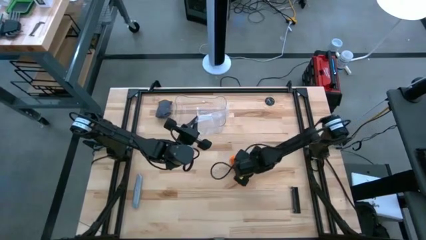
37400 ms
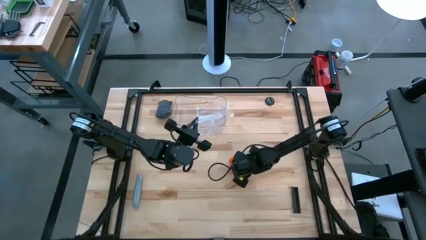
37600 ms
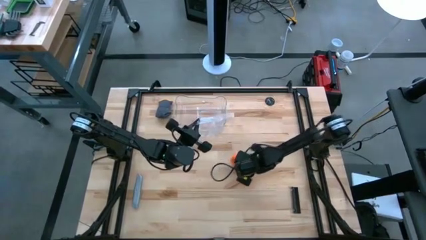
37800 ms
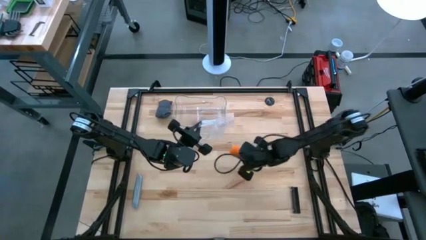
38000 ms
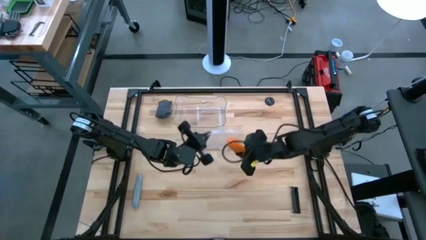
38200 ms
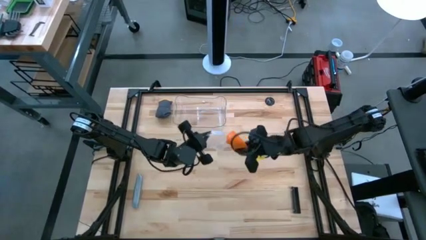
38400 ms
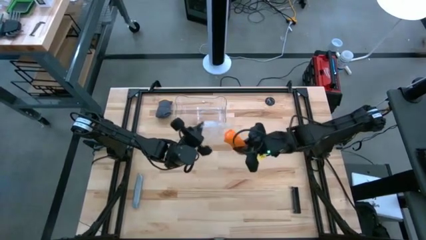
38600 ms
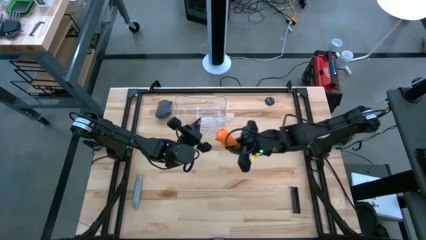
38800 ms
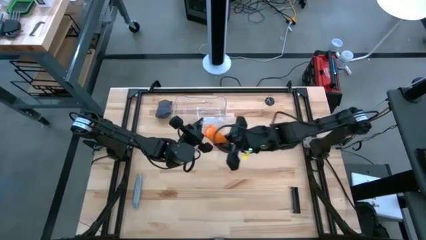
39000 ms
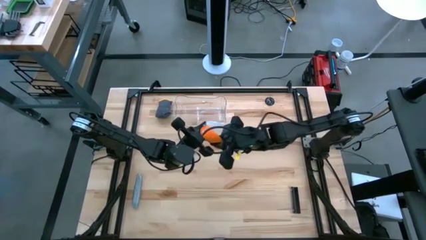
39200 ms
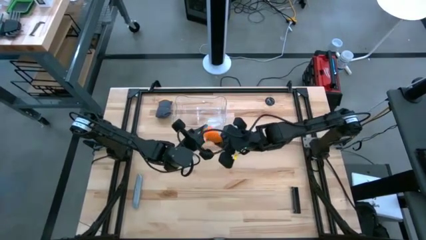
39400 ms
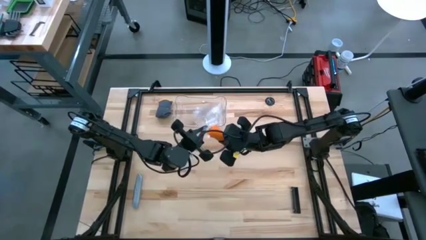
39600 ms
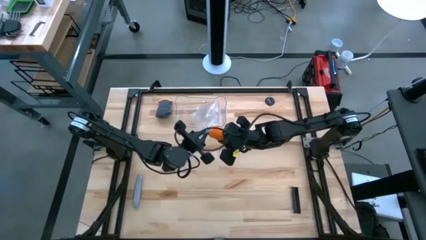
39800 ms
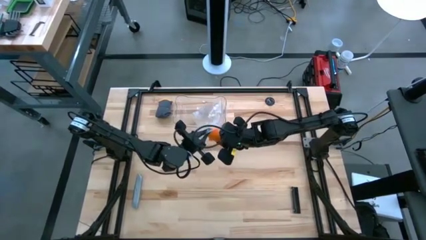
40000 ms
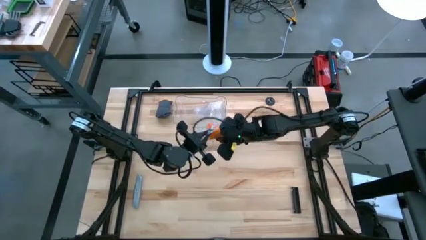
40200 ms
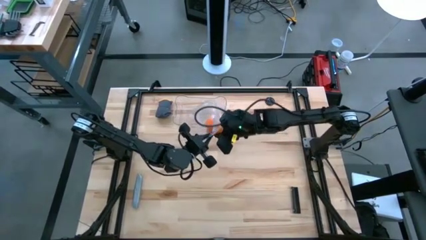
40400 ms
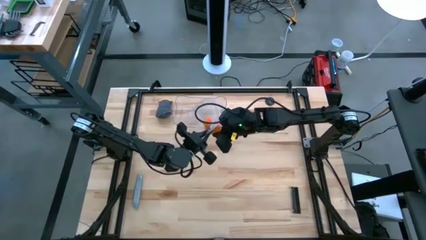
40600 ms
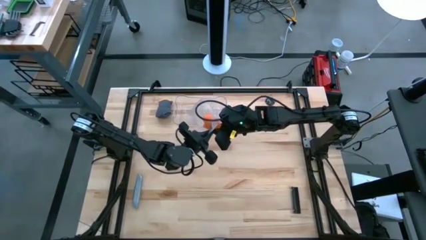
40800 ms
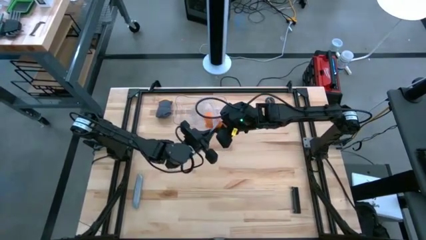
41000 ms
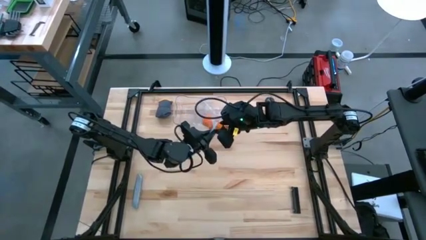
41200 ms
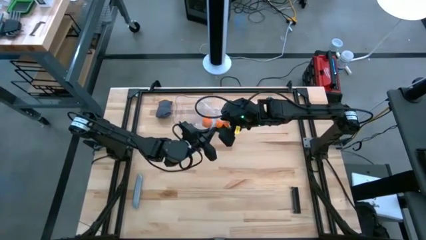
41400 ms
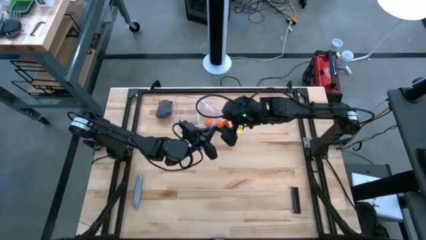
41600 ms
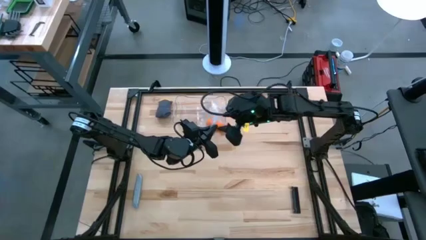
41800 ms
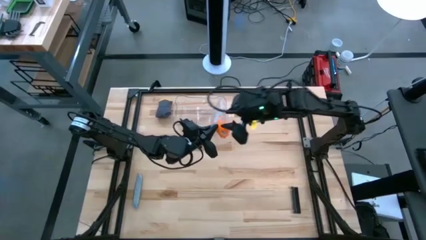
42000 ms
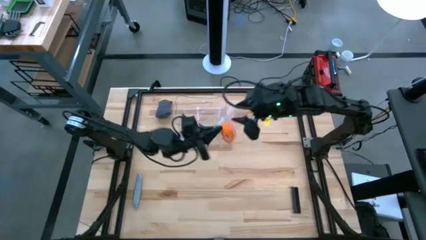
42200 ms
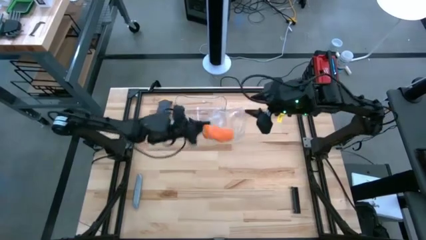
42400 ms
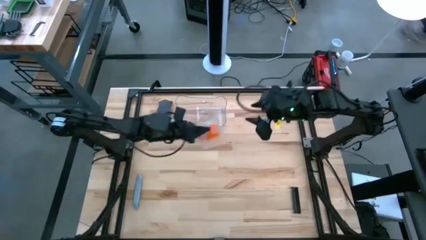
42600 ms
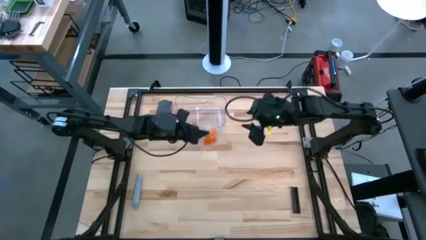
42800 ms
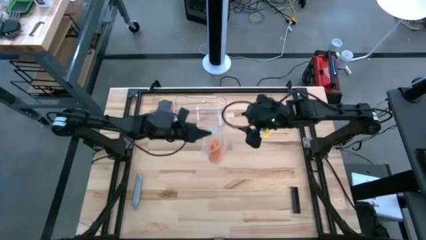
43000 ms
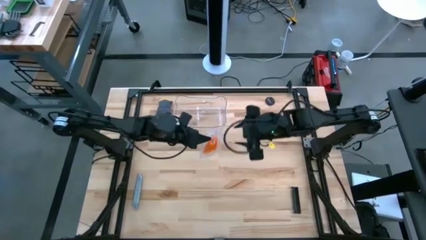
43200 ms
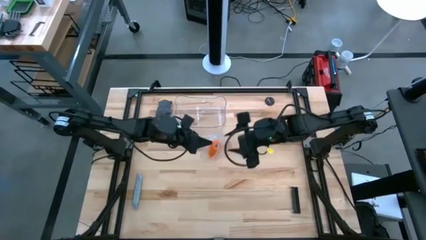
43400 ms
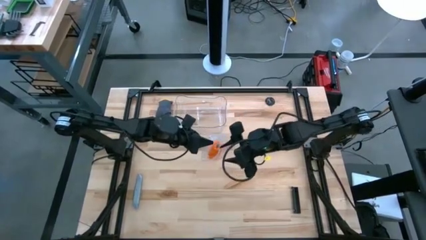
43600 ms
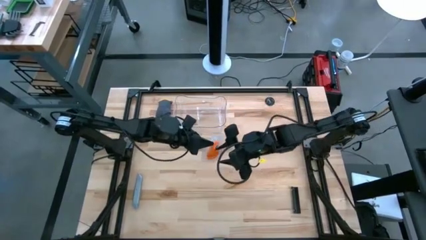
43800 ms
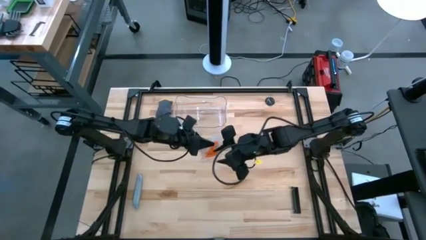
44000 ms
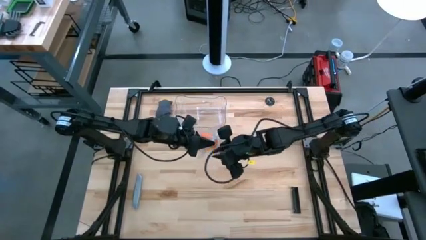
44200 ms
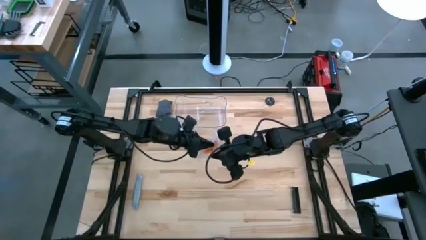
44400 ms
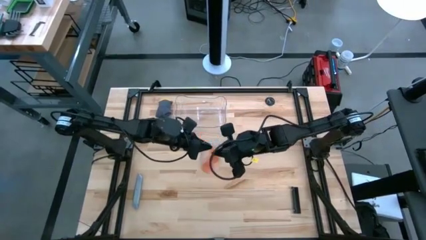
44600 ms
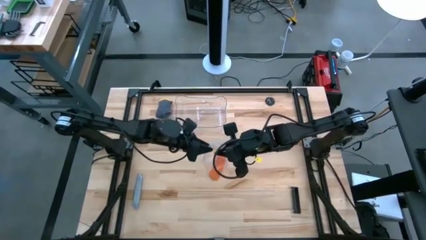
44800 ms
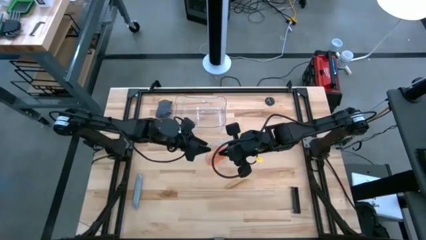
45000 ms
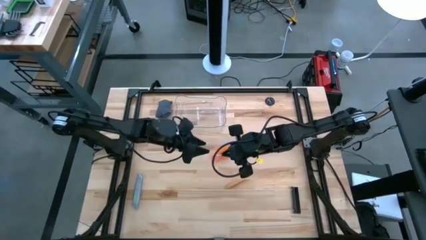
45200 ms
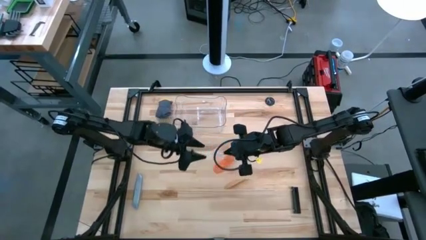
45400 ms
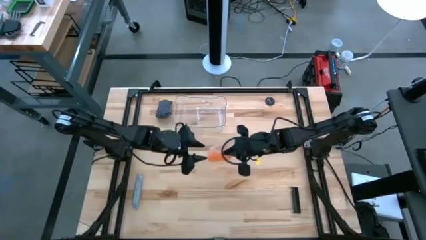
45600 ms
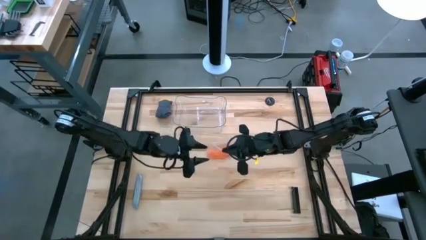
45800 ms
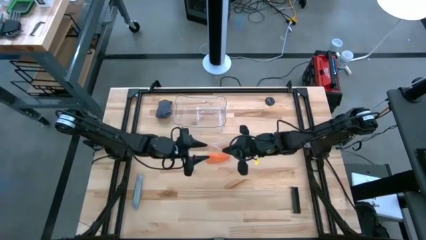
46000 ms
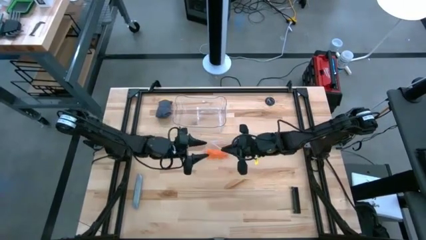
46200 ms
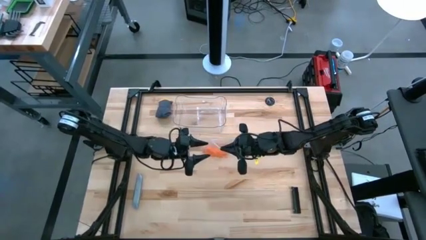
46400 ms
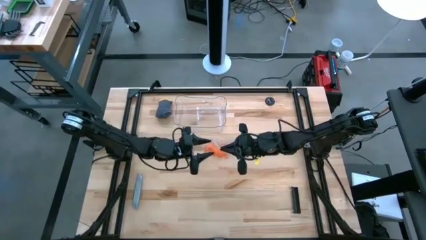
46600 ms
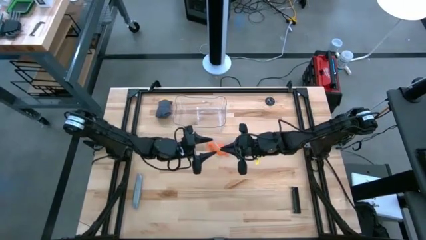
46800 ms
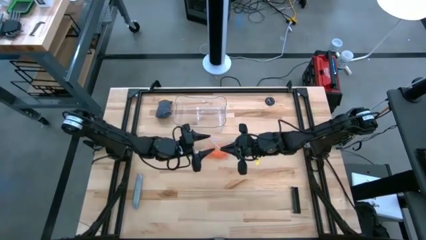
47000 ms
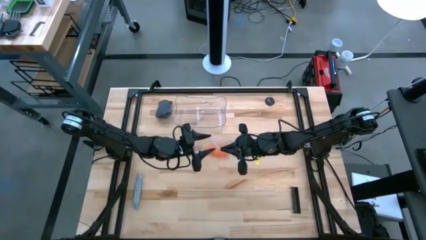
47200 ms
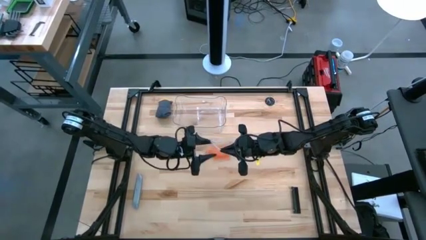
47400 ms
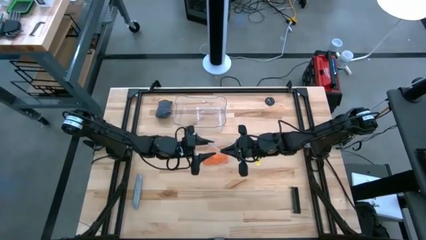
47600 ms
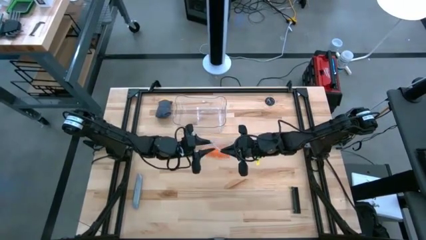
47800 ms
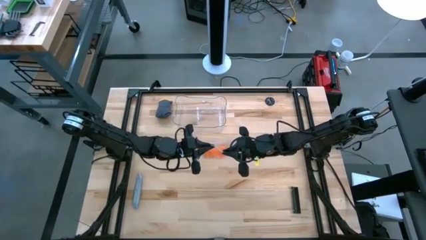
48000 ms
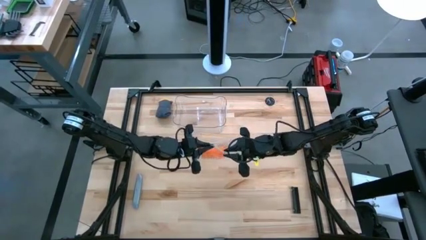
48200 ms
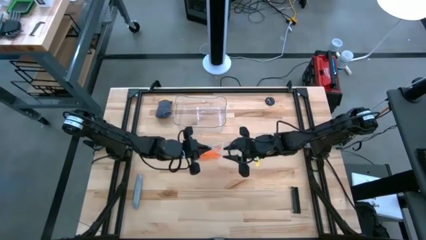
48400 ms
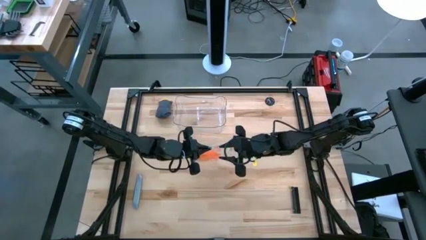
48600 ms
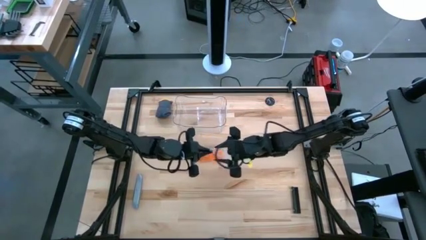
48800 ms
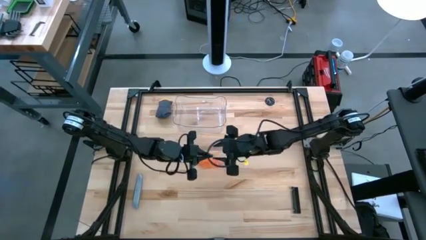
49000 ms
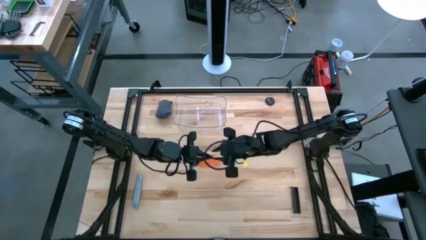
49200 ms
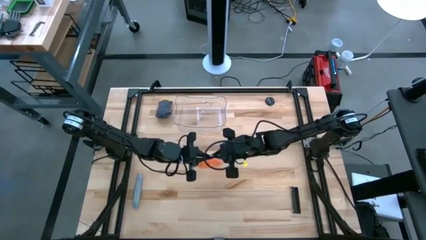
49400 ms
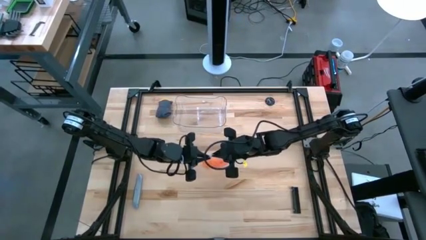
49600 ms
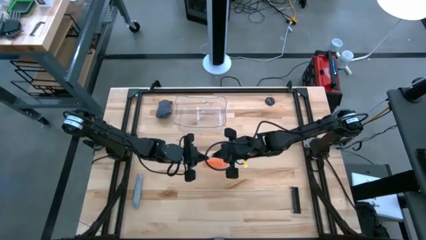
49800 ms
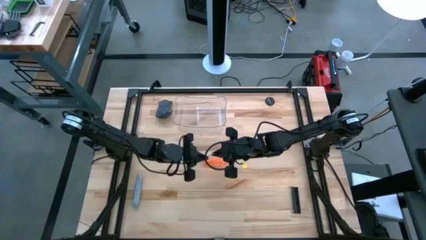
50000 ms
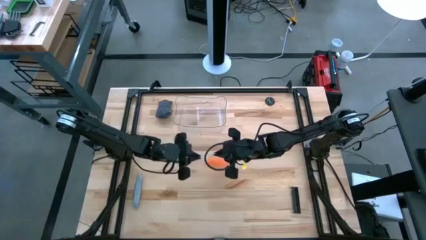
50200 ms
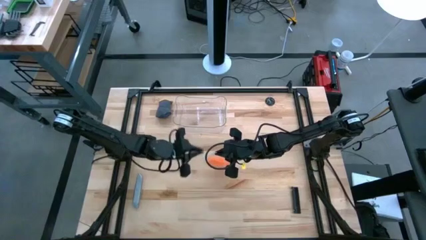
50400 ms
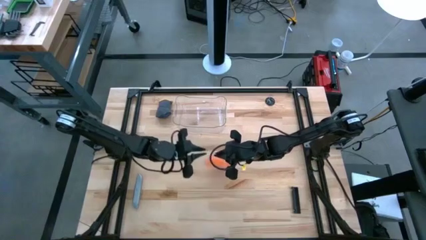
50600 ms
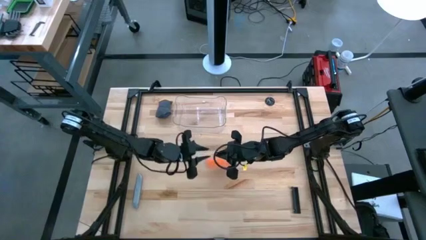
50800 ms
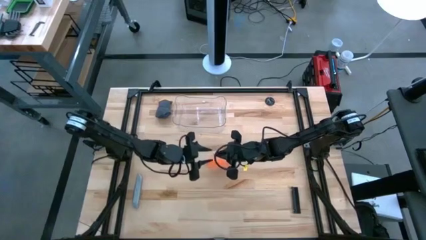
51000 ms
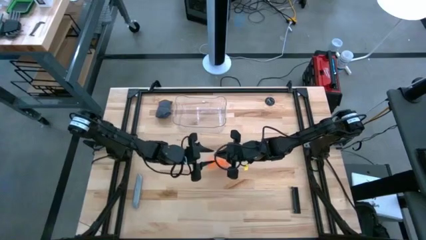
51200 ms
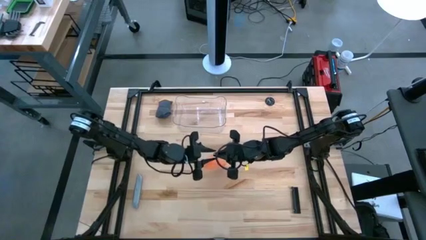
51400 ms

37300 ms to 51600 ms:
Task: Roll bandage
Close the transparent zip bag
